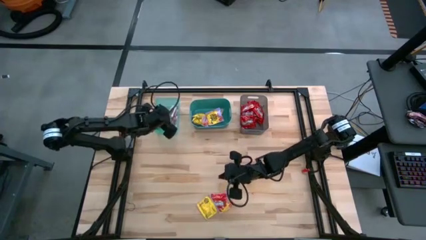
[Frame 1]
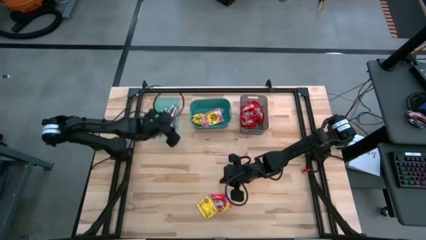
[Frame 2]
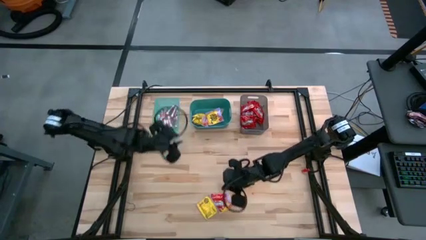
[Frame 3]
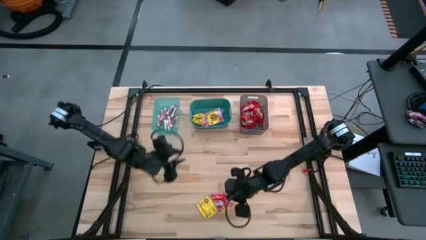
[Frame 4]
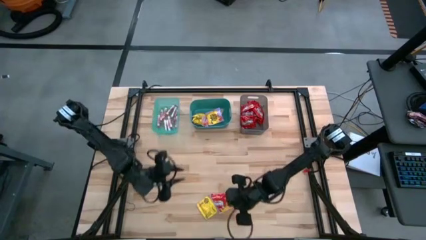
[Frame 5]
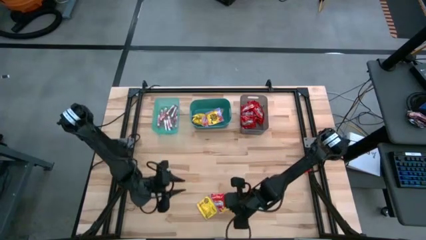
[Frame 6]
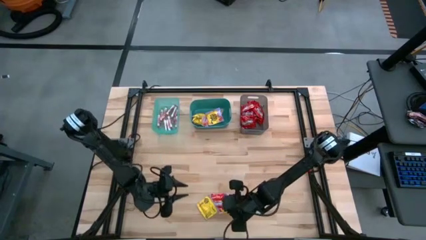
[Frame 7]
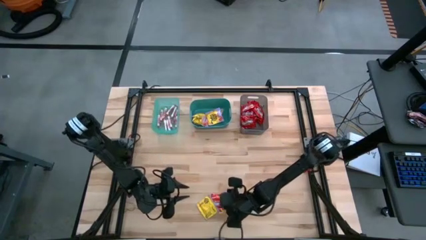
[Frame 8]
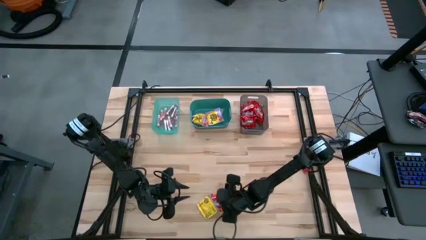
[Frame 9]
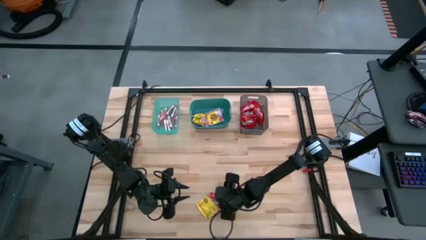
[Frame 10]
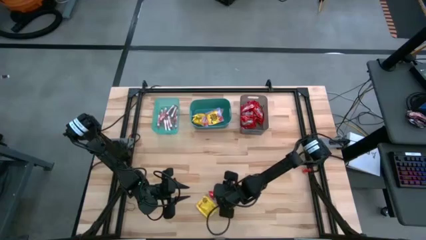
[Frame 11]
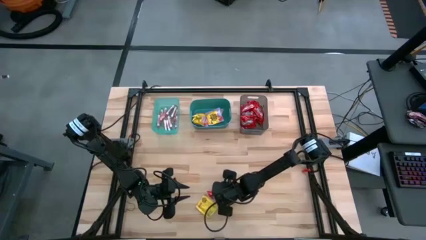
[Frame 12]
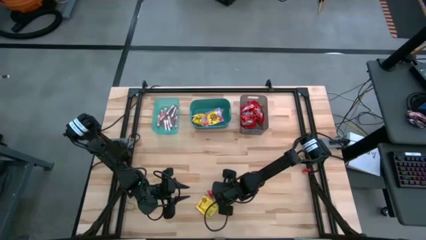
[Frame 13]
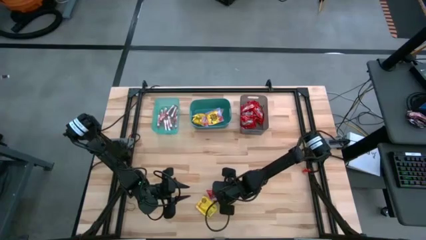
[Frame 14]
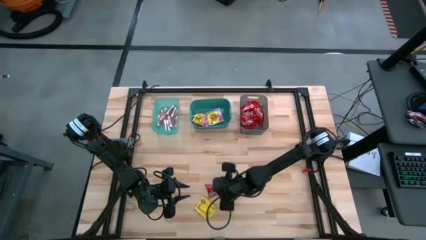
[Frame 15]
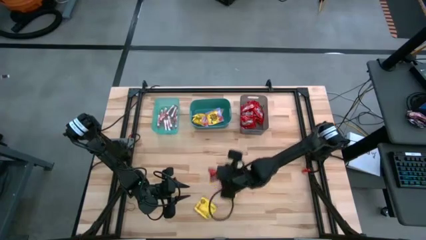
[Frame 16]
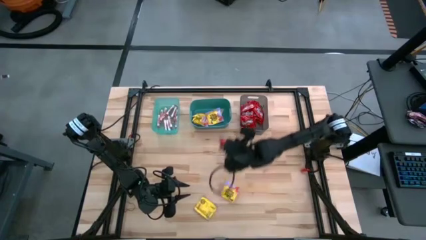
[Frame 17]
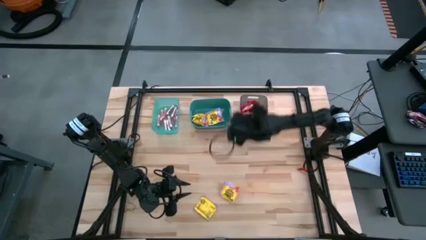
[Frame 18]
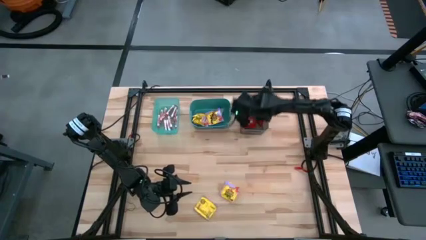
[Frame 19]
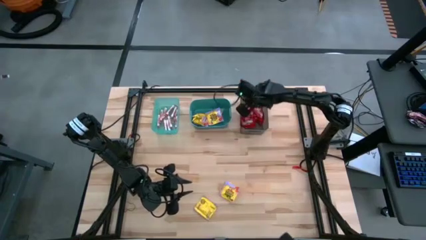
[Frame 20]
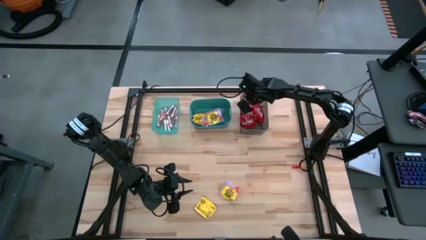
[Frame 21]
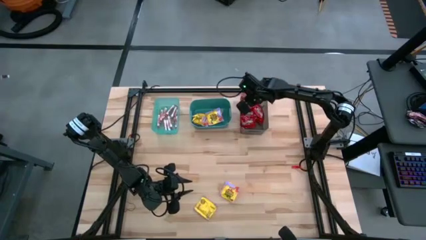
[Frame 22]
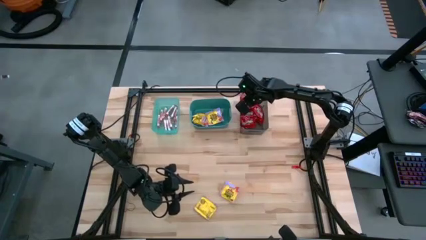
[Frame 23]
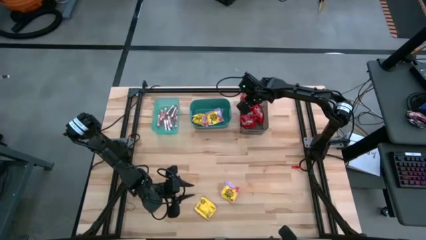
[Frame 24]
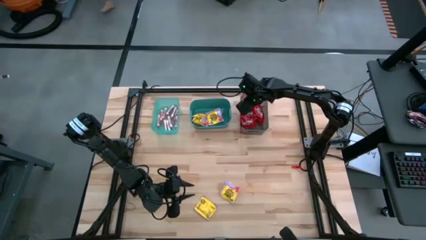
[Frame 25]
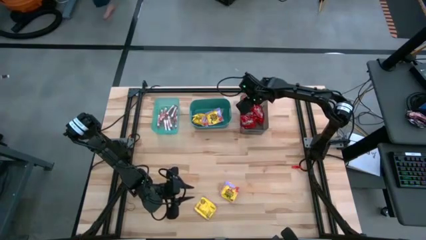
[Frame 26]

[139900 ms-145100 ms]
Task: Sort candy
Put the red candy into the black bin

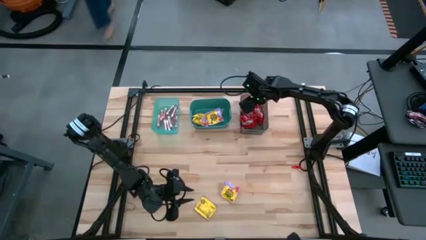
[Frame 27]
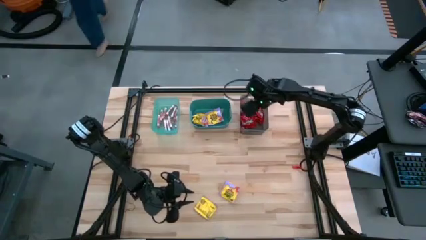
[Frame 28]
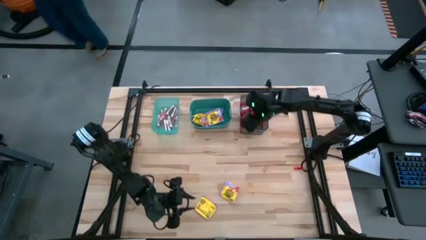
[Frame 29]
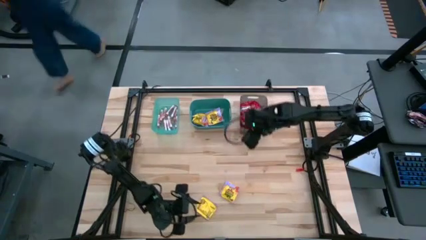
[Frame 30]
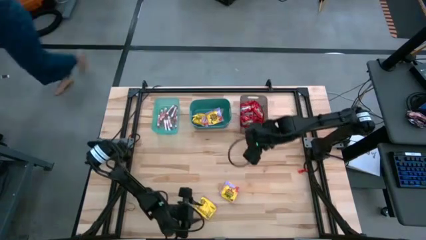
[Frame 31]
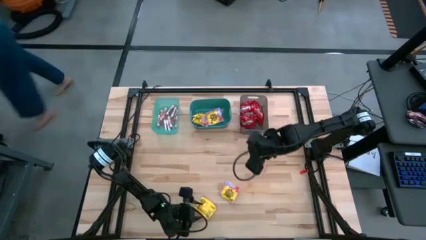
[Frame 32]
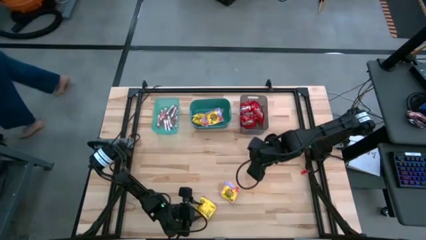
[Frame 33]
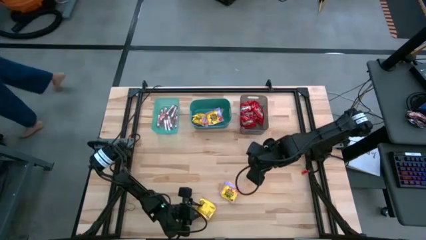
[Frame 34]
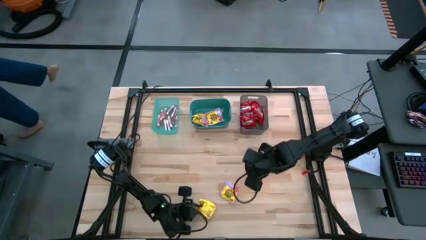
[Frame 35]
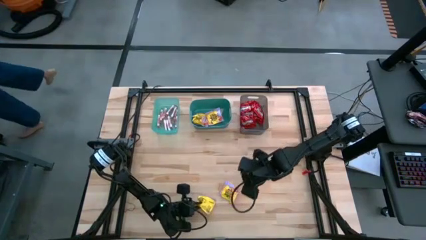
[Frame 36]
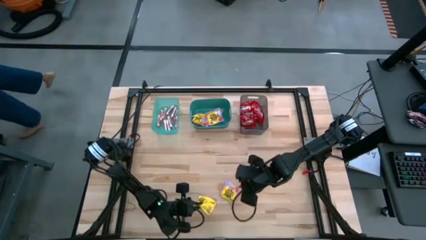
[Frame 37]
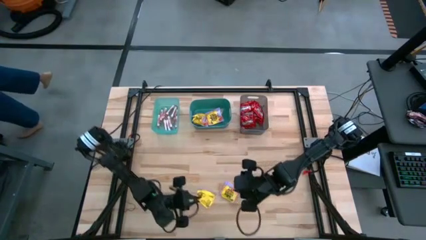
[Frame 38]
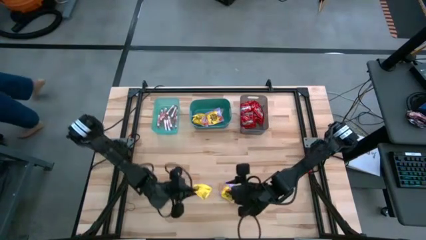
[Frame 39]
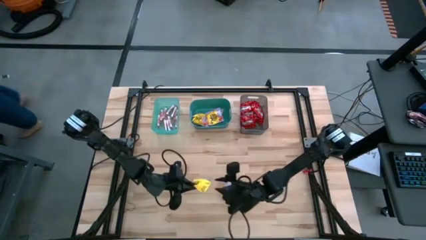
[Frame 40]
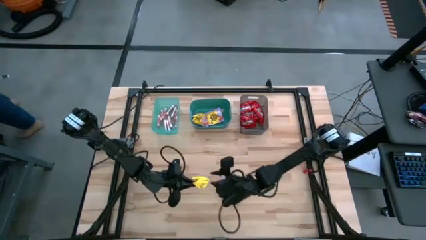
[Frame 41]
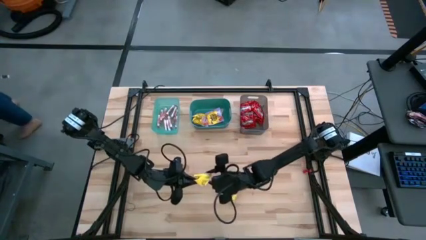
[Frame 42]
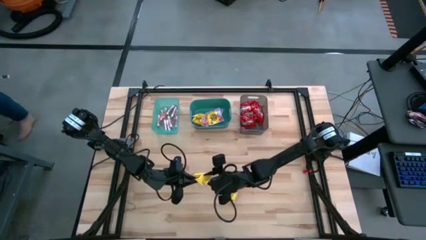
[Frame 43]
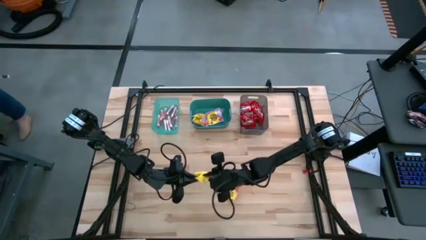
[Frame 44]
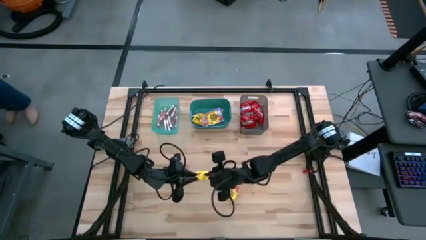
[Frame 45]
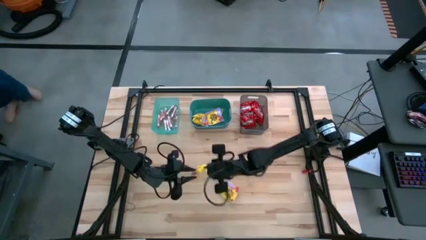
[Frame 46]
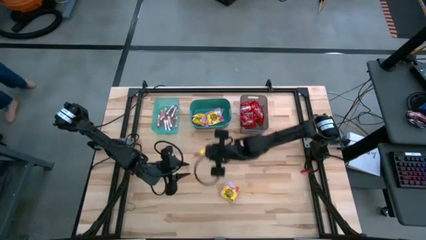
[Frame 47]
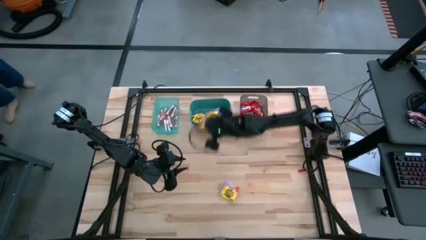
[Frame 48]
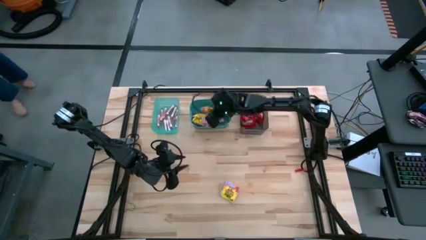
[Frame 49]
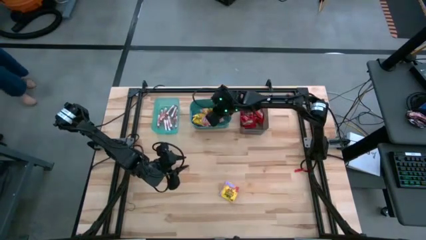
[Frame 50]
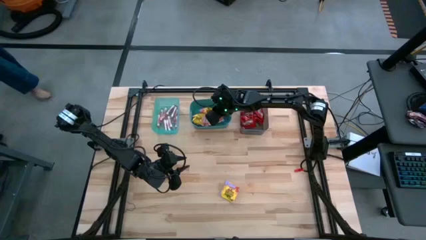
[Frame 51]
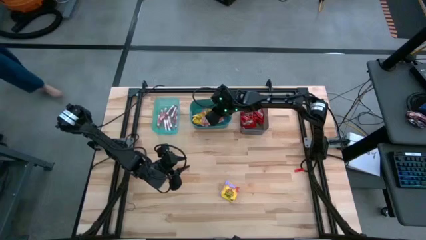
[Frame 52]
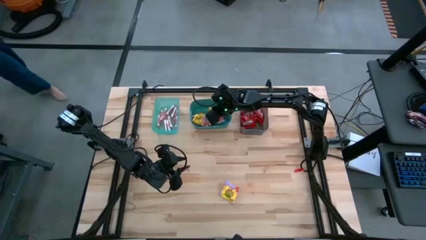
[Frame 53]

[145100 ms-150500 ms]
Put the yellow candy into the green bin

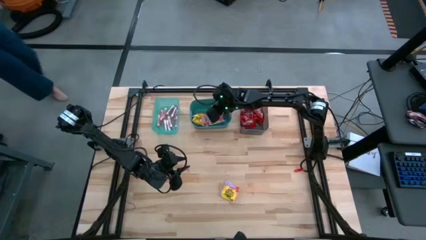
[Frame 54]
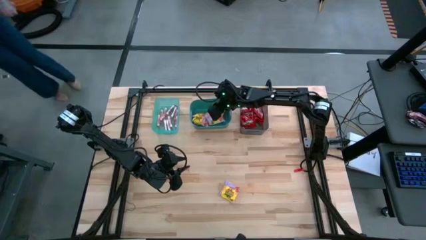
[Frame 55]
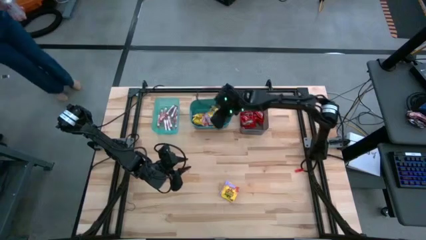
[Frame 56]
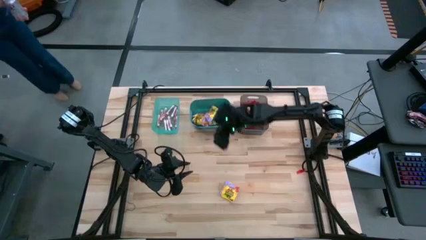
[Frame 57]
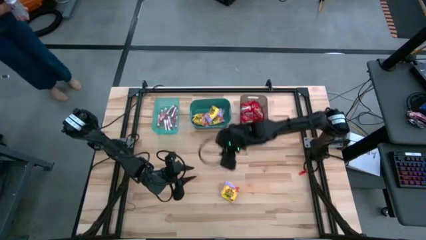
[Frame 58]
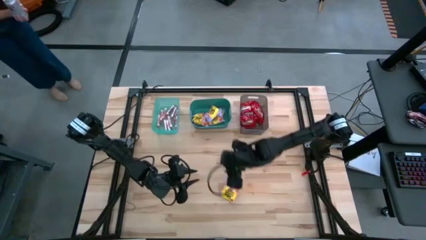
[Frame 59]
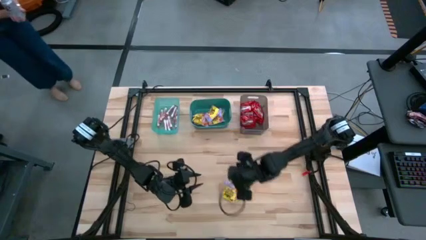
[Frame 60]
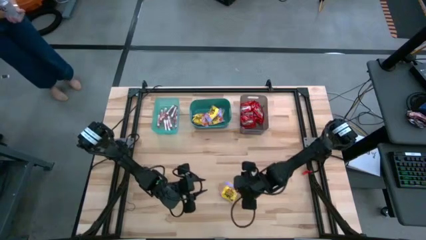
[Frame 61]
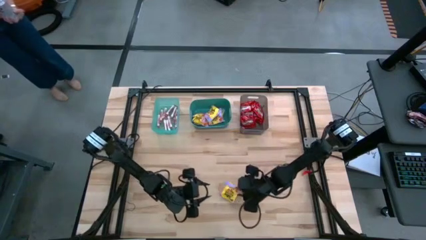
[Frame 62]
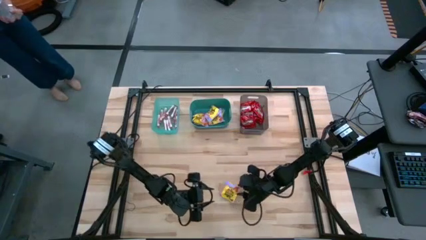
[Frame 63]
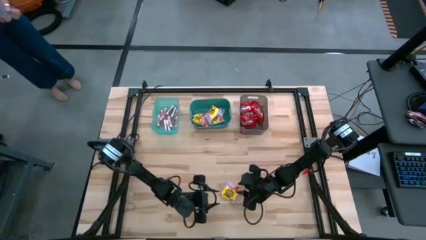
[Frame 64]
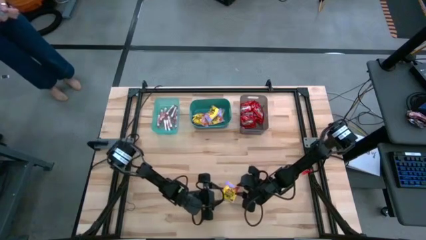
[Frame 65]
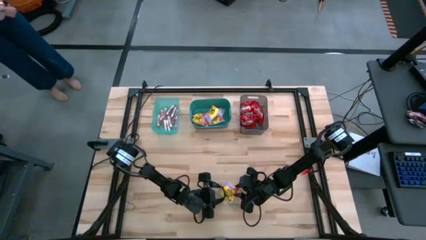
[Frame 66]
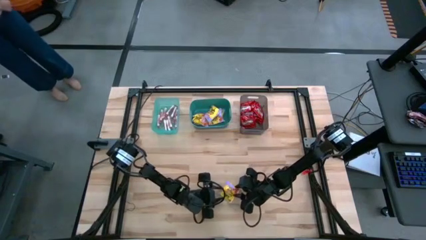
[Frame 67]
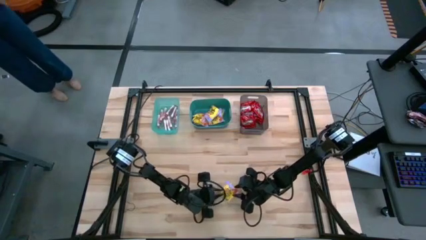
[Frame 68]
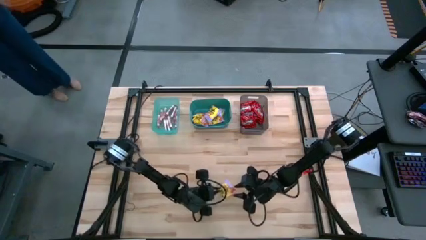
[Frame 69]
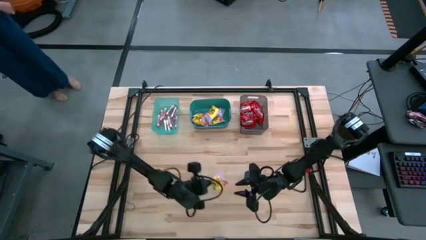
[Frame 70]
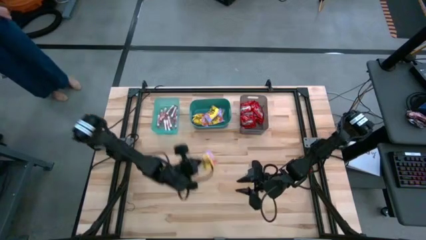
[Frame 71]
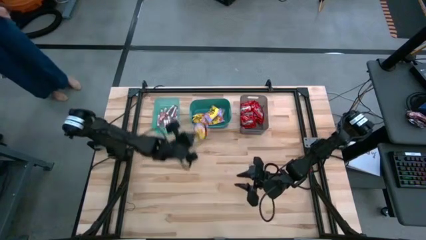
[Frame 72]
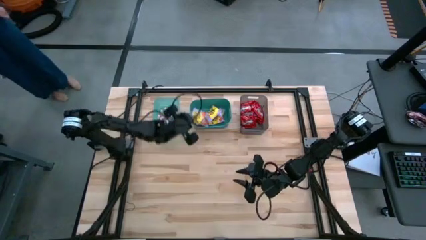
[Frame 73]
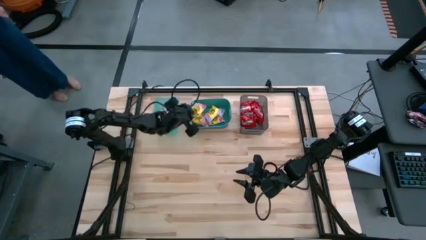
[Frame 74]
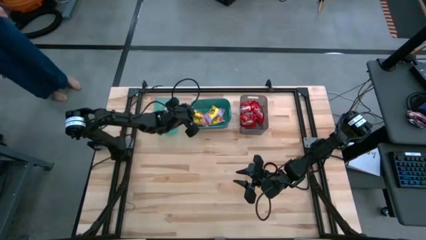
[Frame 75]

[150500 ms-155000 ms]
Put the yellow candy into the green bin
